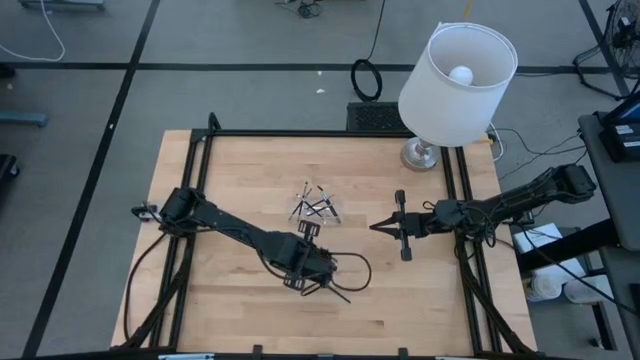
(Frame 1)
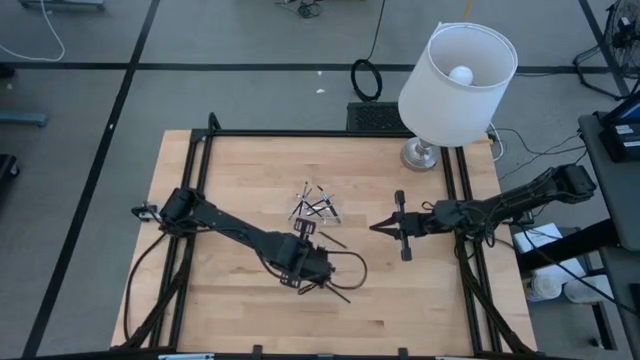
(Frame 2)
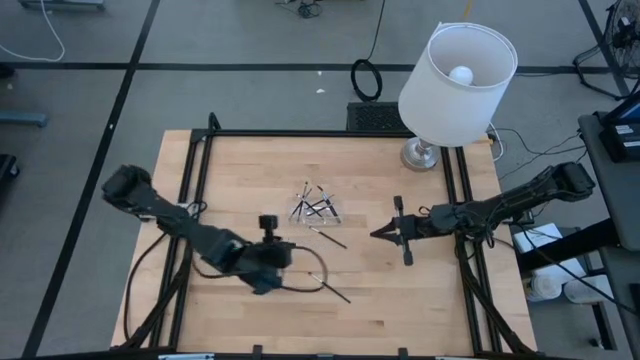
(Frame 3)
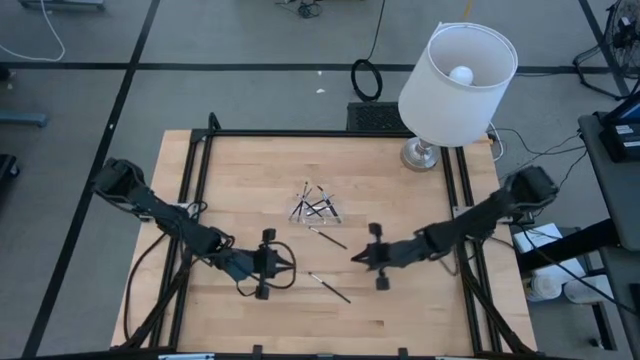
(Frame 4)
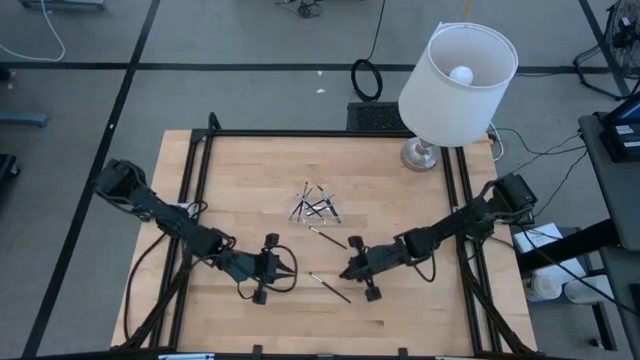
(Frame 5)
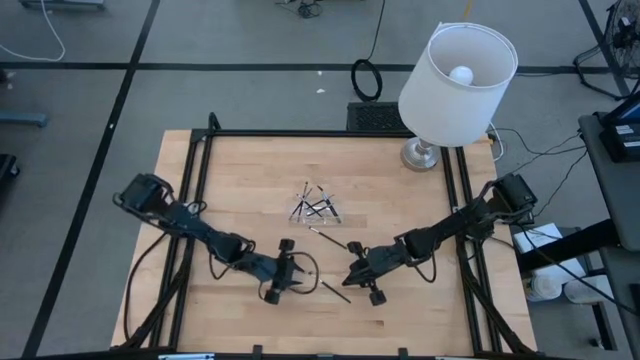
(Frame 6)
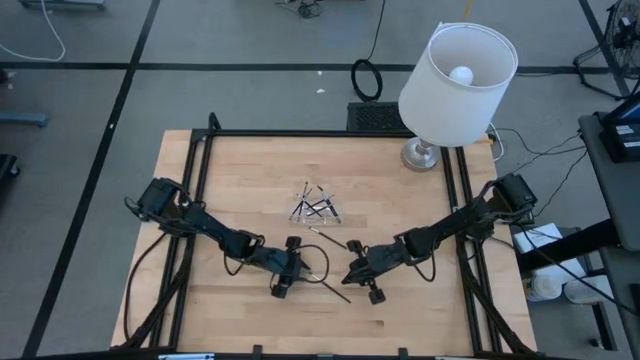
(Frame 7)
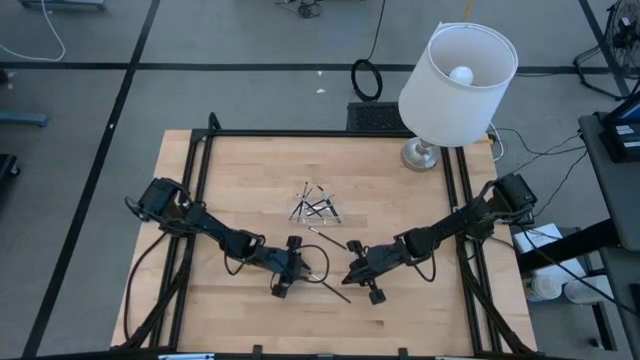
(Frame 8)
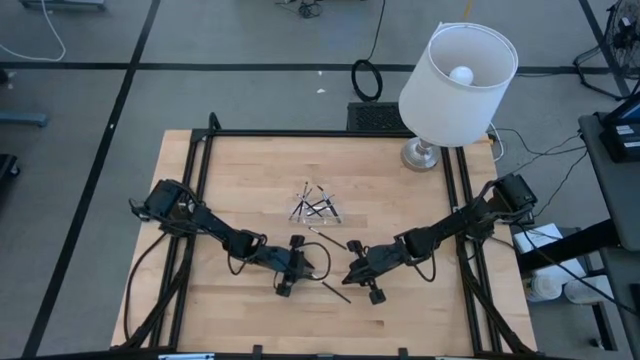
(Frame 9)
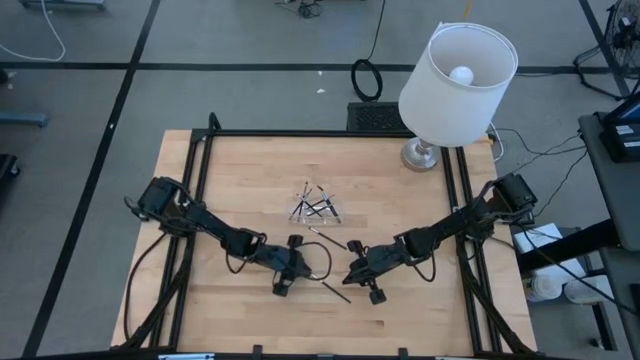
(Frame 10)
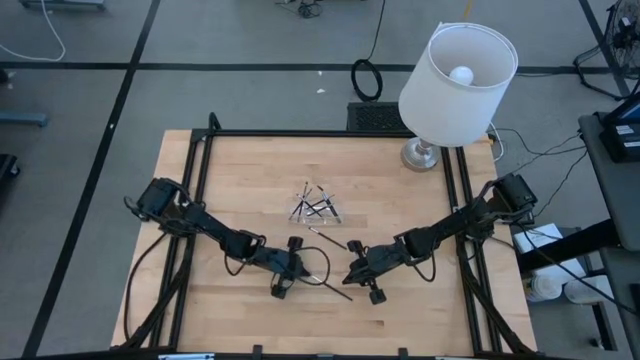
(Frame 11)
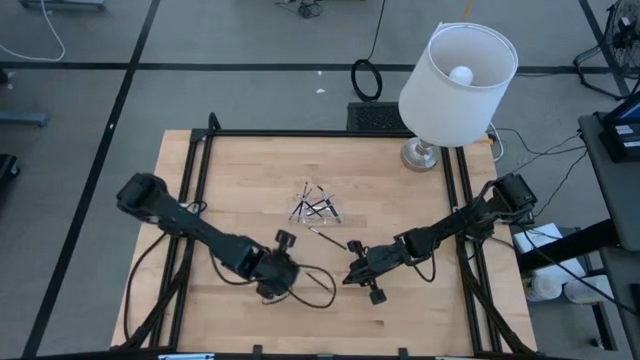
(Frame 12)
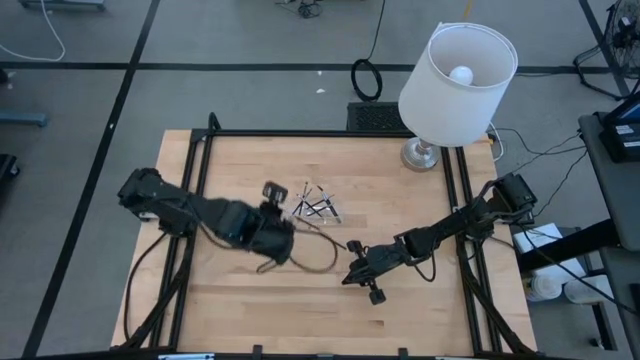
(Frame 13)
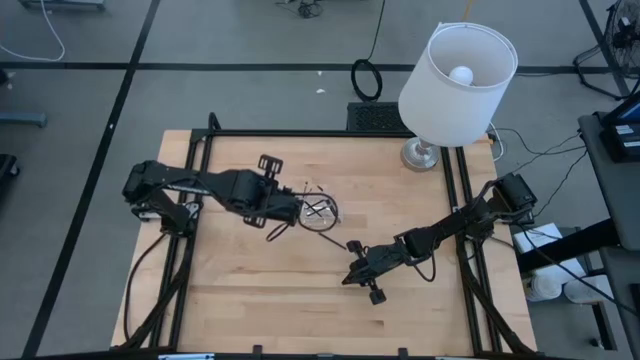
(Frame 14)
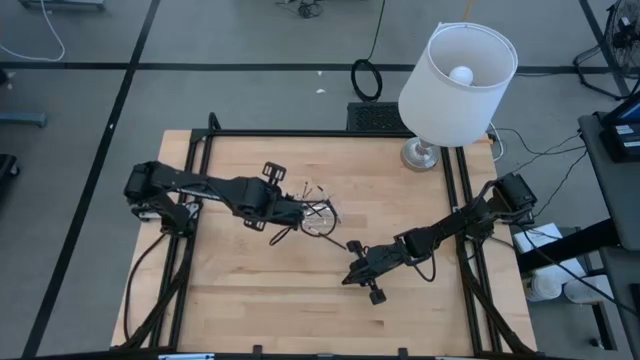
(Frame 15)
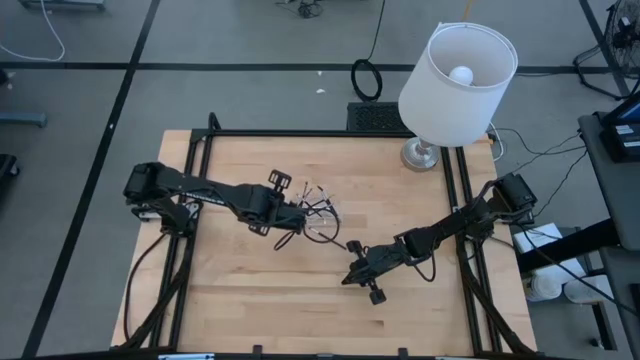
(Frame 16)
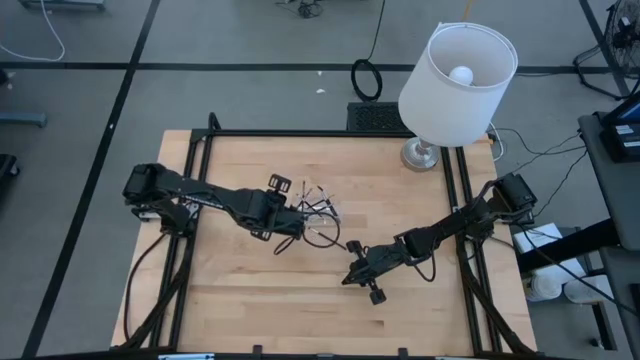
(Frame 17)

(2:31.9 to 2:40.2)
Task: Pick & Place Makeup Supplies
Put the makeup brush into the transparent organizer

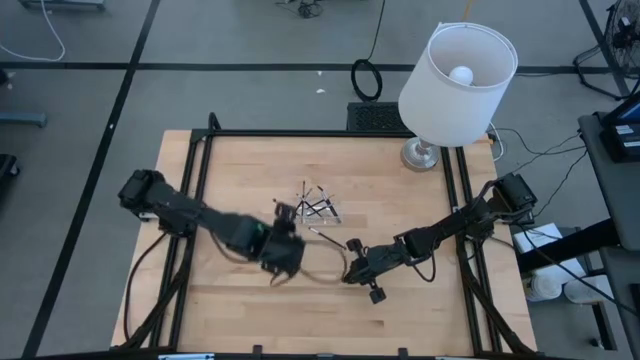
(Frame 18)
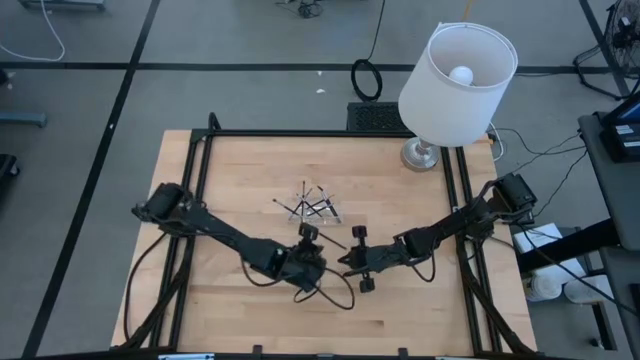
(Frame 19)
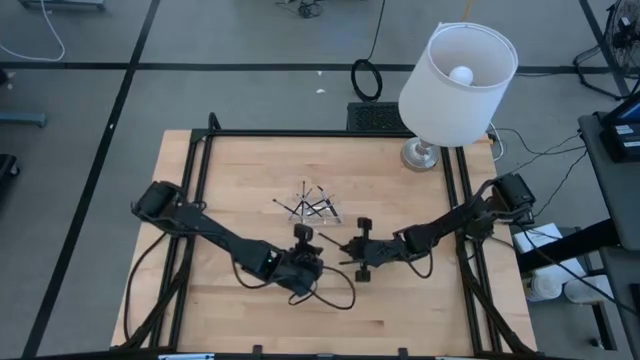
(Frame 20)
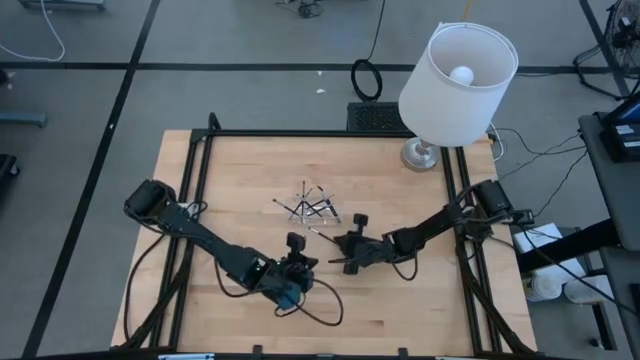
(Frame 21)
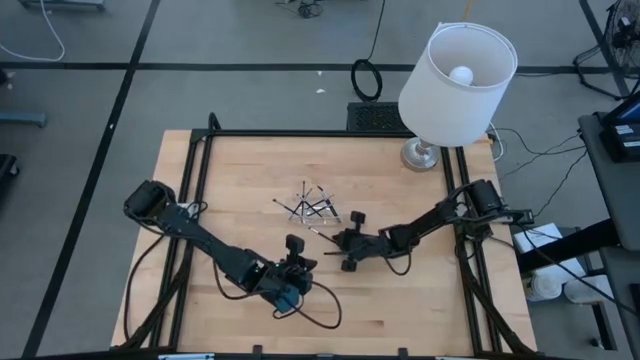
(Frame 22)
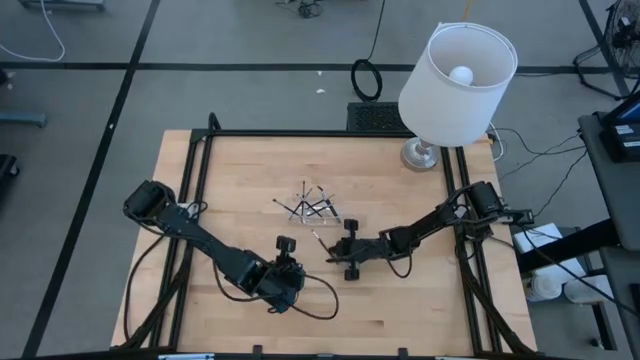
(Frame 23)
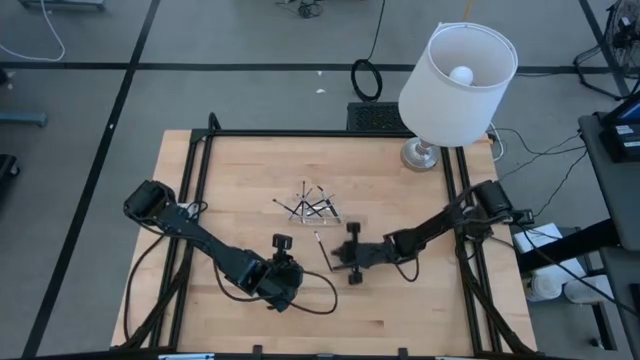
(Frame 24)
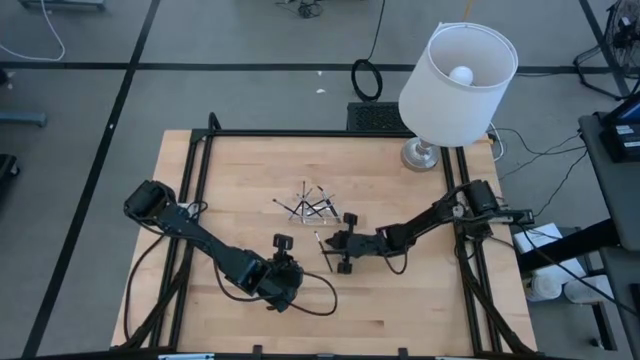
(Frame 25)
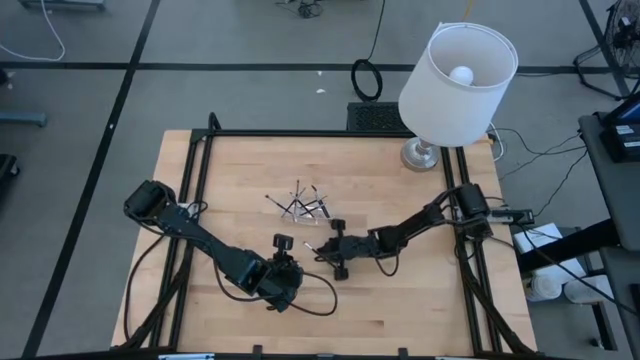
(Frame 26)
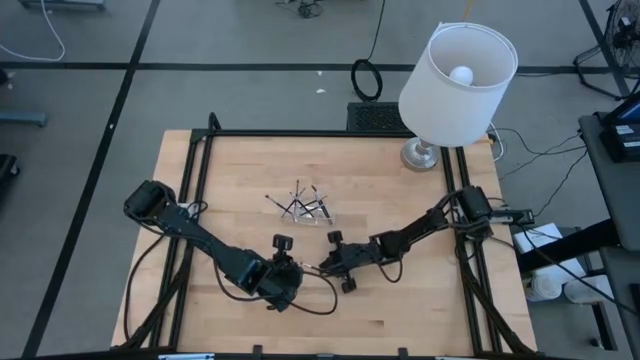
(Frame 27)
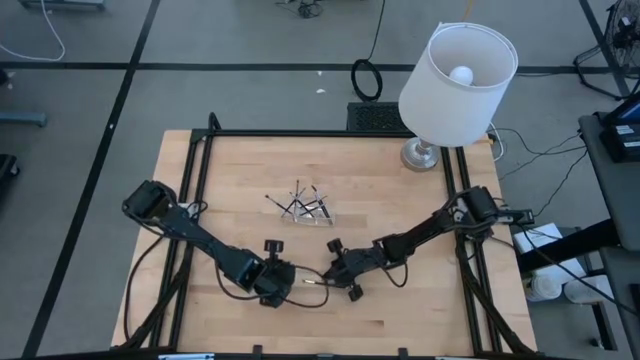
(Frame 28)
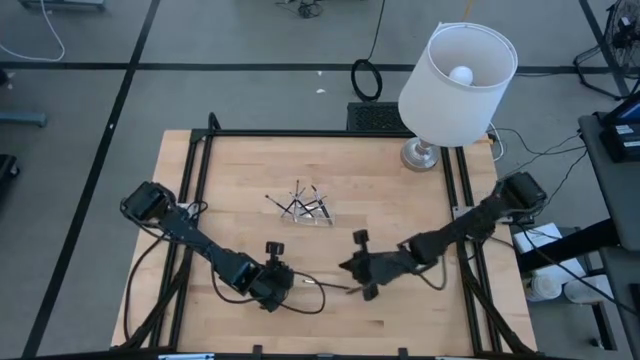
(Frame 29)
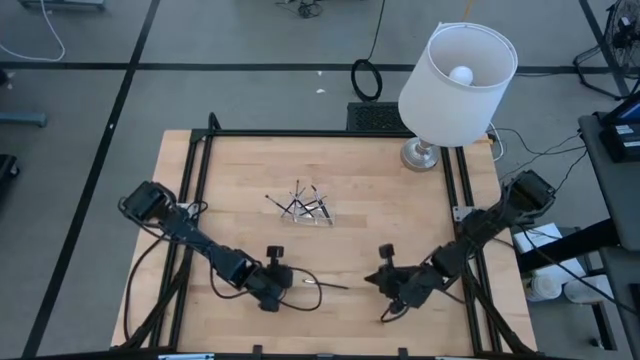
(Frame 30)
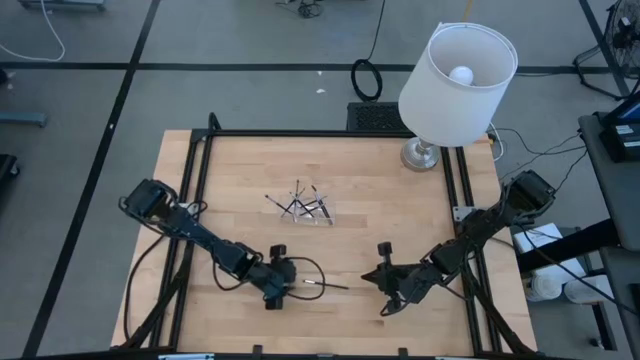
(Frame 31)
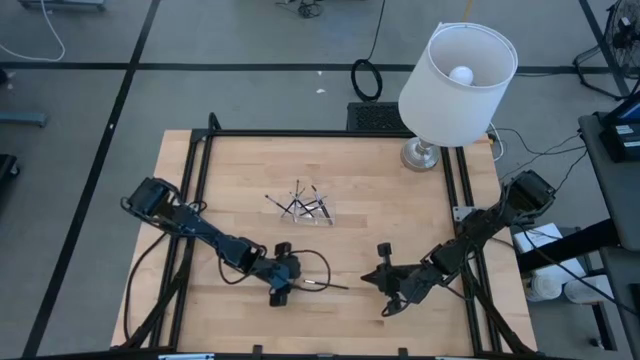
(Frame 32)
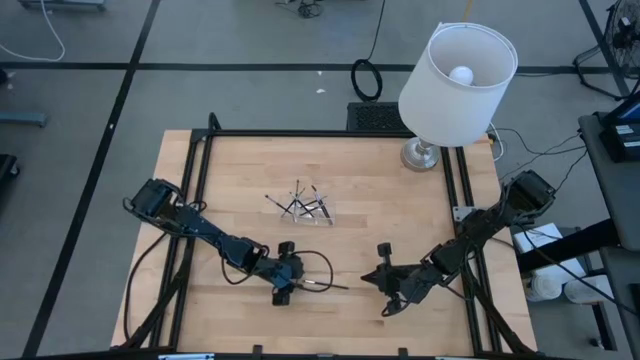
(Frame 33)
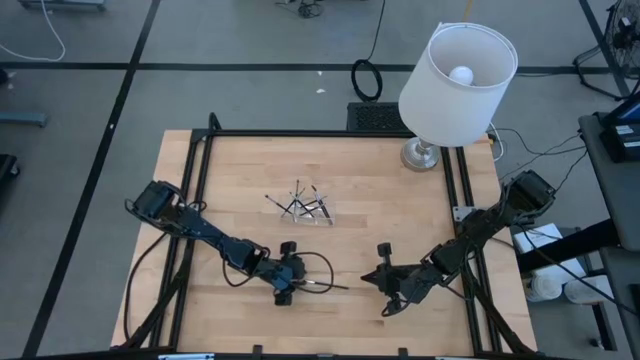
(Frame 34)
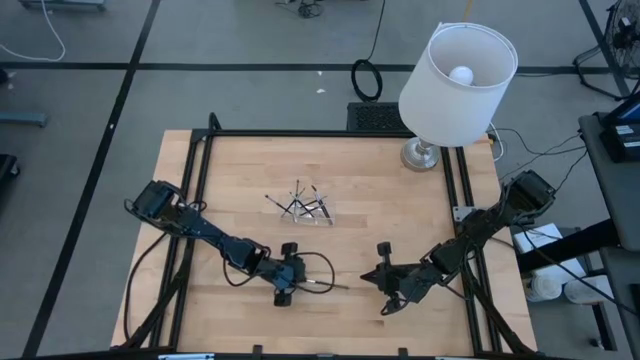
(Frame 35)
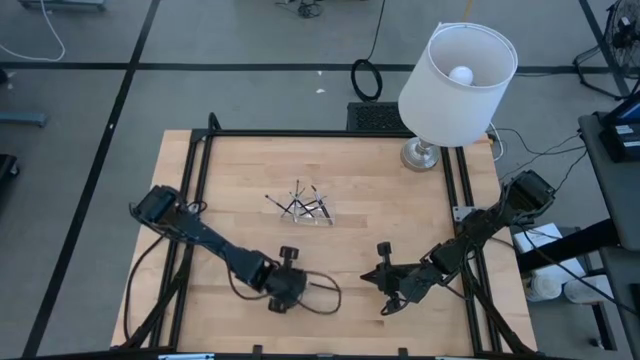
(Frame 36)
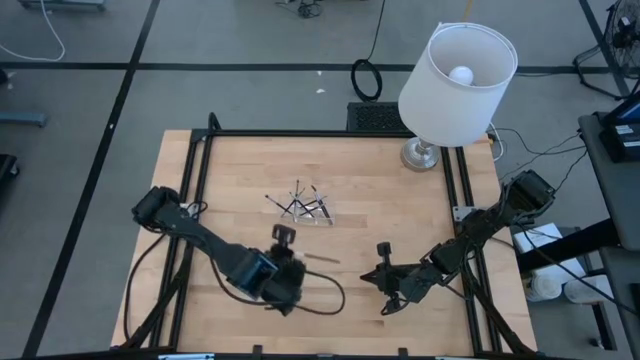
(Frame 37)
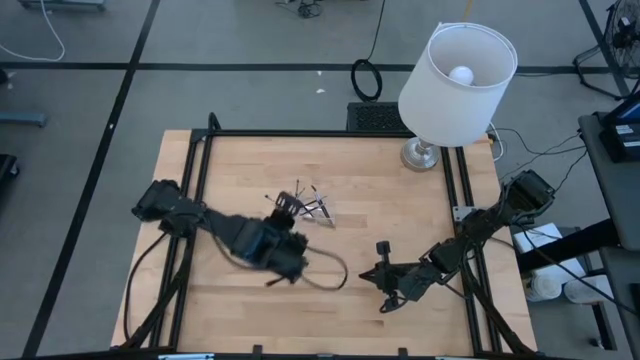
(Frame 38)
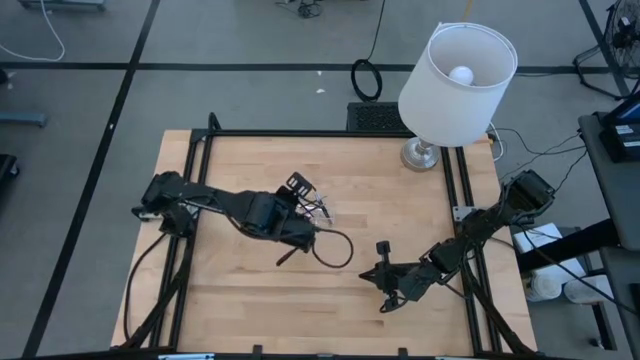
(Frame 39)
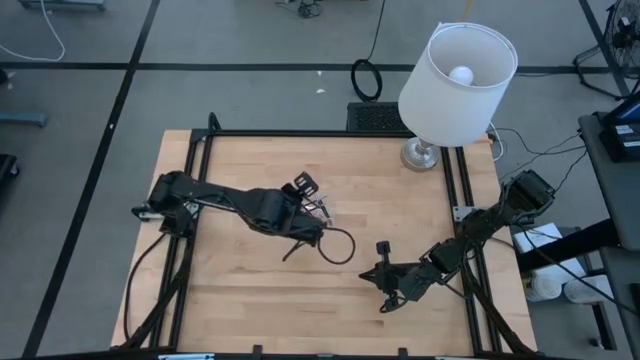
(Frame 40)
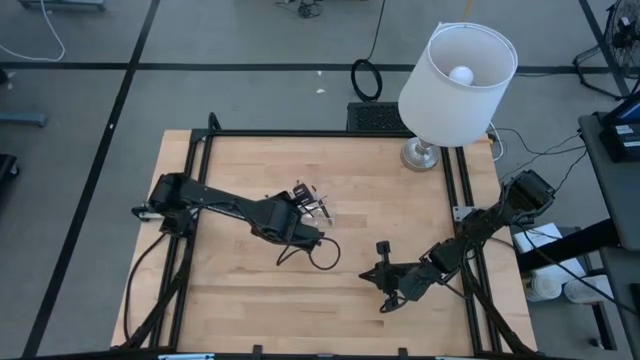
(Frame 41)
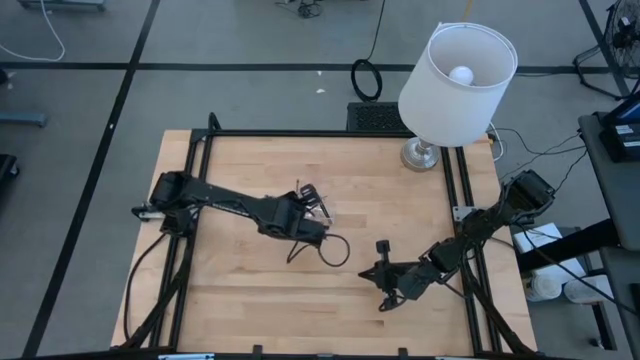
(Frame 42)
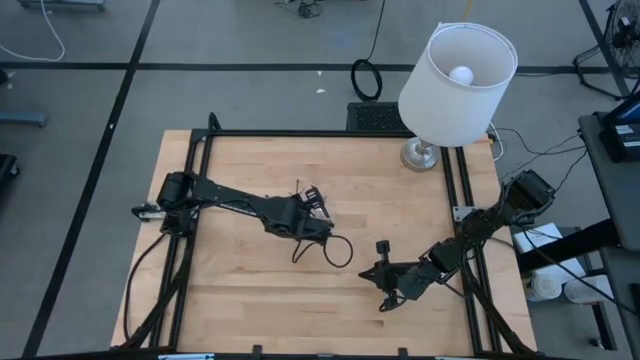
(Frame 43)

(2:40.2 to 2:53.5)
Put the makeup brush into the transparent organizer
